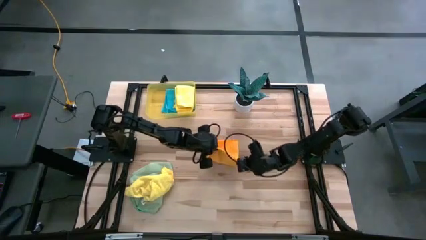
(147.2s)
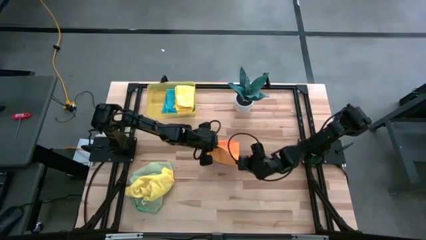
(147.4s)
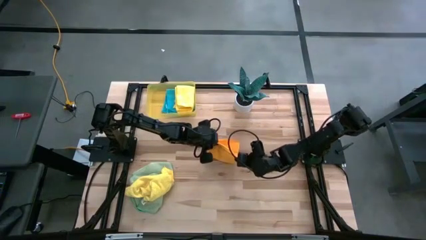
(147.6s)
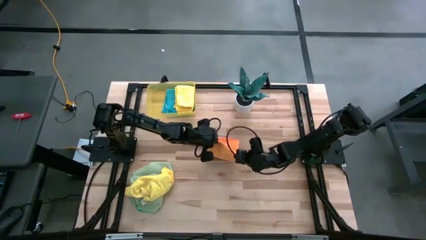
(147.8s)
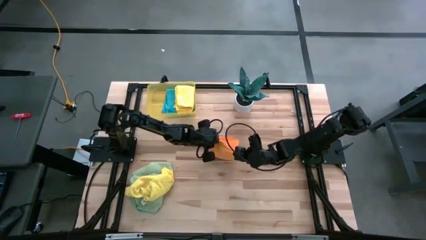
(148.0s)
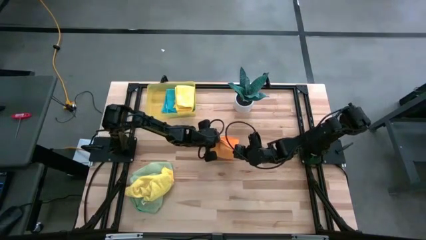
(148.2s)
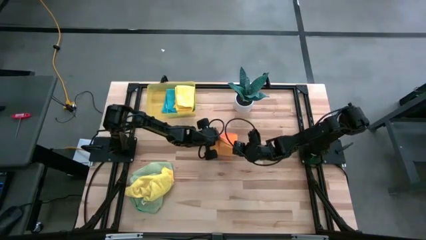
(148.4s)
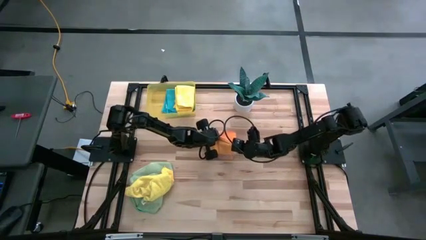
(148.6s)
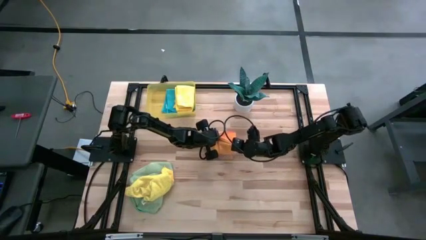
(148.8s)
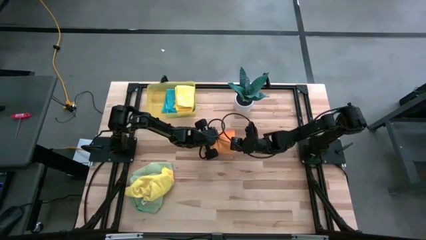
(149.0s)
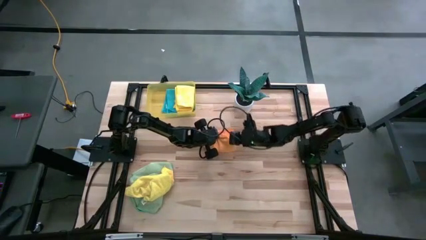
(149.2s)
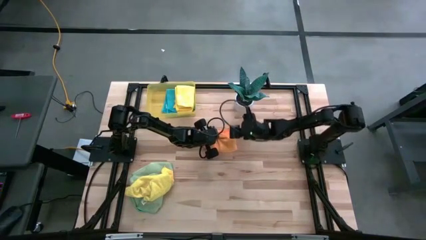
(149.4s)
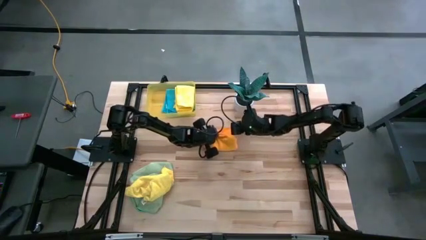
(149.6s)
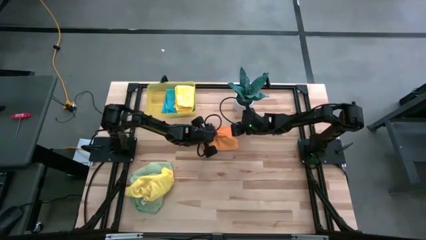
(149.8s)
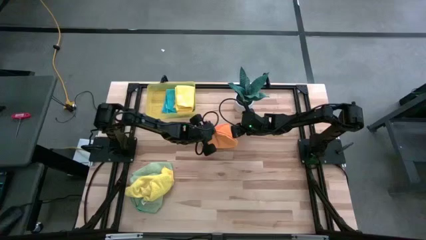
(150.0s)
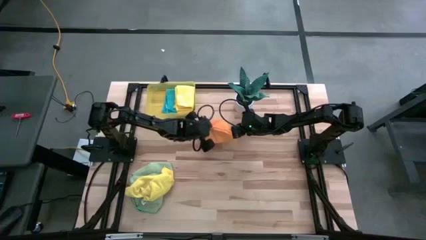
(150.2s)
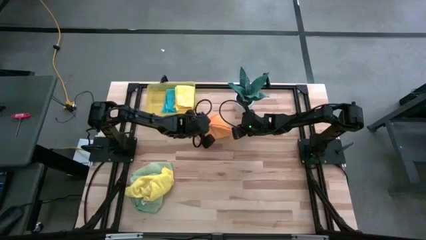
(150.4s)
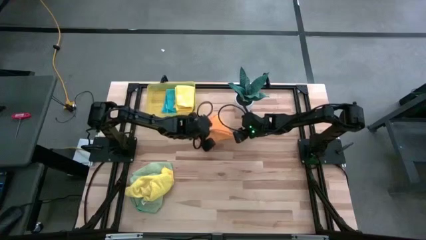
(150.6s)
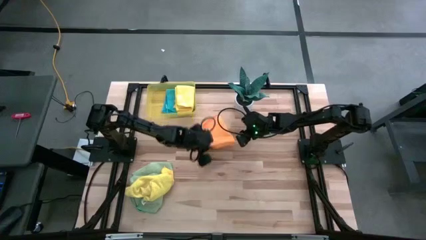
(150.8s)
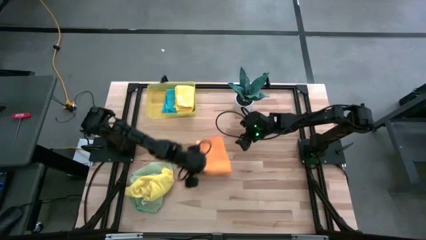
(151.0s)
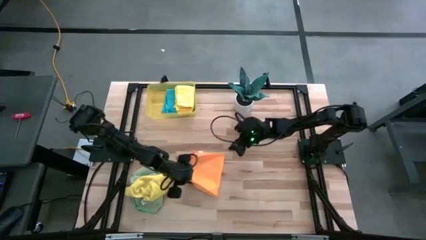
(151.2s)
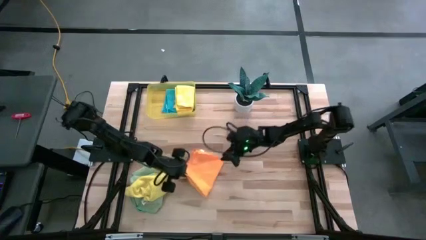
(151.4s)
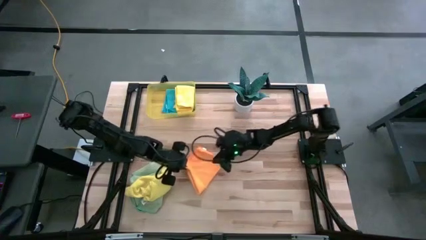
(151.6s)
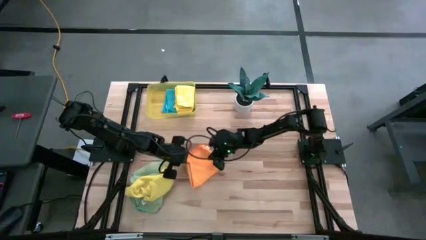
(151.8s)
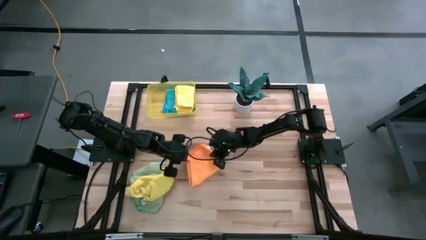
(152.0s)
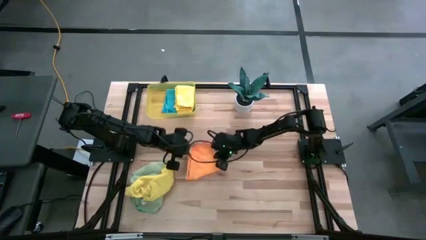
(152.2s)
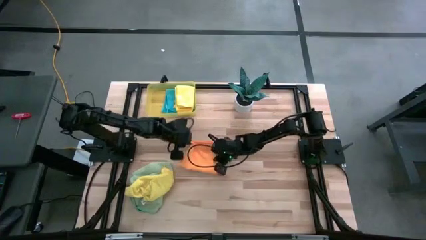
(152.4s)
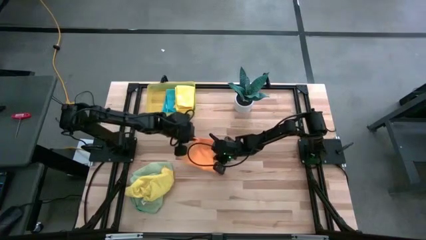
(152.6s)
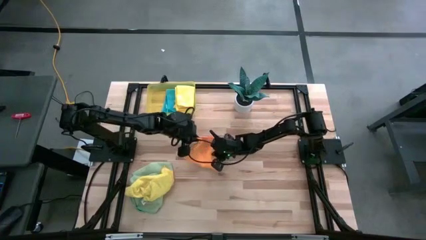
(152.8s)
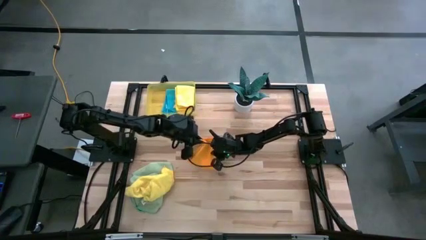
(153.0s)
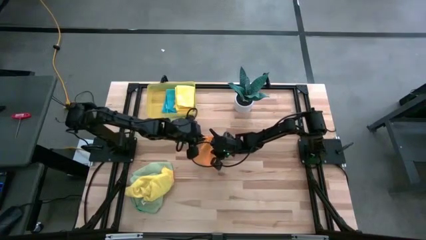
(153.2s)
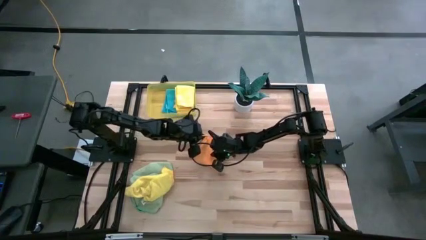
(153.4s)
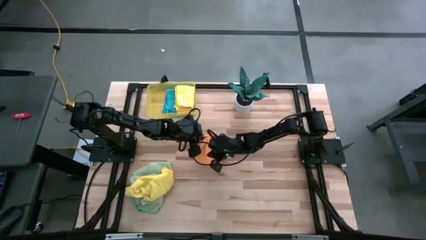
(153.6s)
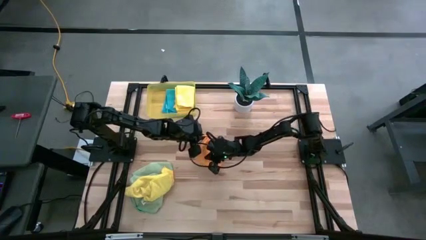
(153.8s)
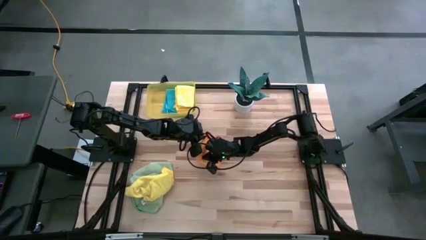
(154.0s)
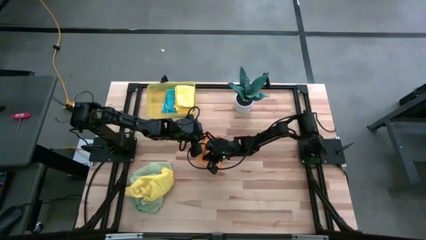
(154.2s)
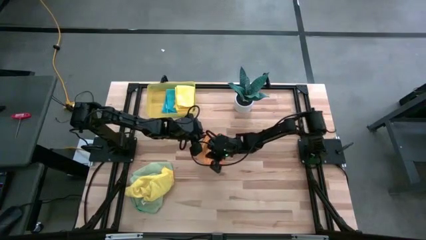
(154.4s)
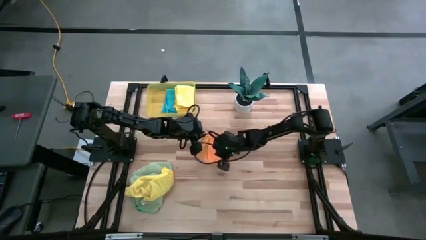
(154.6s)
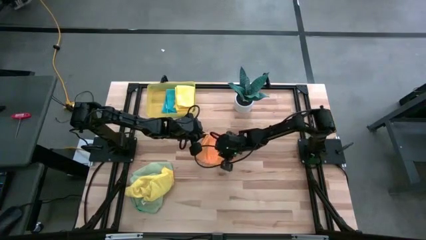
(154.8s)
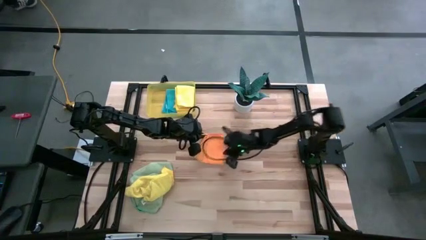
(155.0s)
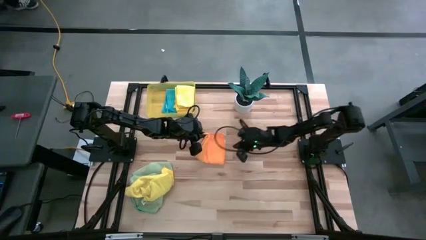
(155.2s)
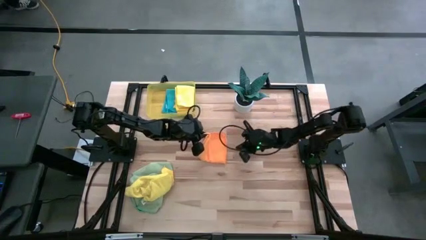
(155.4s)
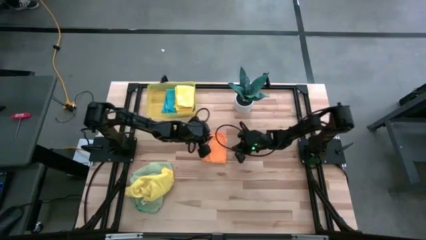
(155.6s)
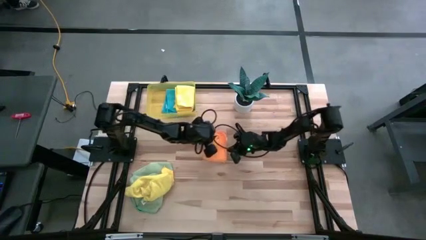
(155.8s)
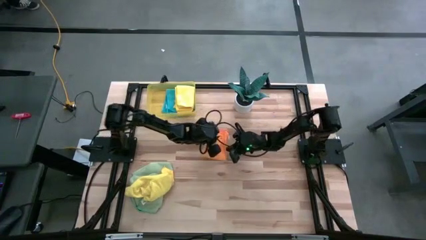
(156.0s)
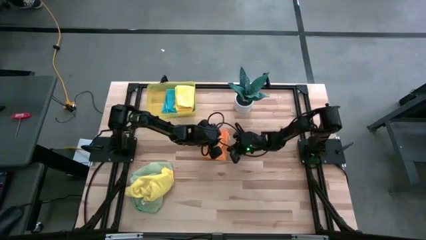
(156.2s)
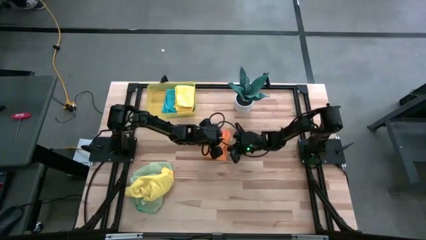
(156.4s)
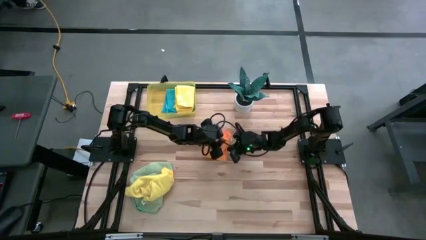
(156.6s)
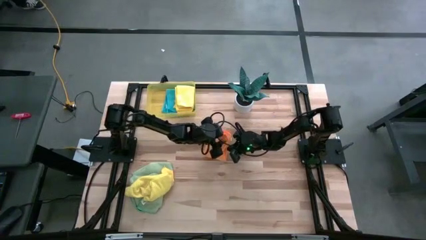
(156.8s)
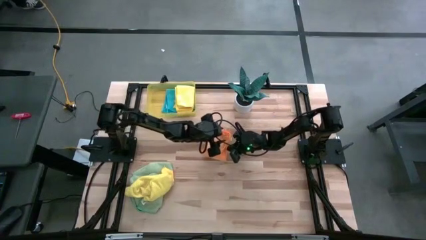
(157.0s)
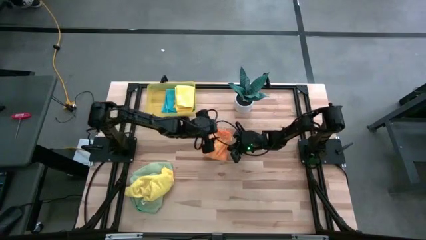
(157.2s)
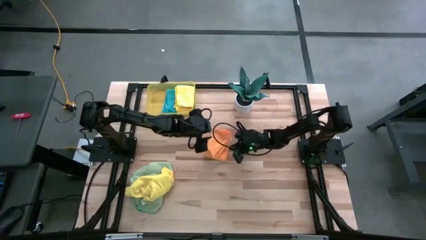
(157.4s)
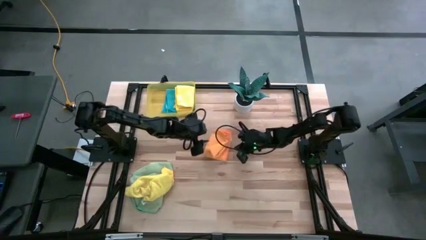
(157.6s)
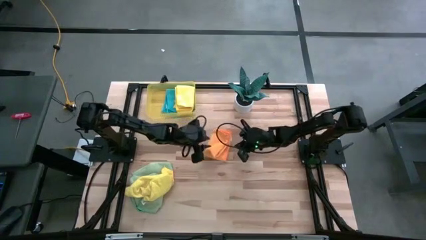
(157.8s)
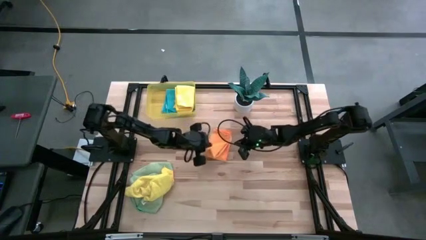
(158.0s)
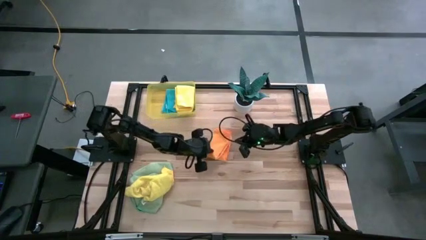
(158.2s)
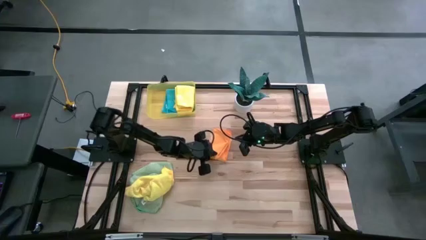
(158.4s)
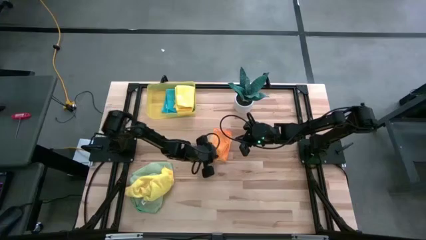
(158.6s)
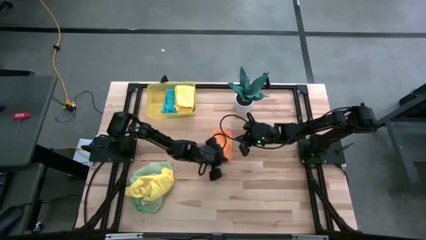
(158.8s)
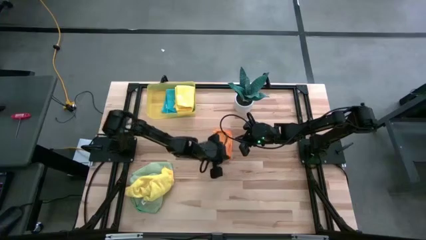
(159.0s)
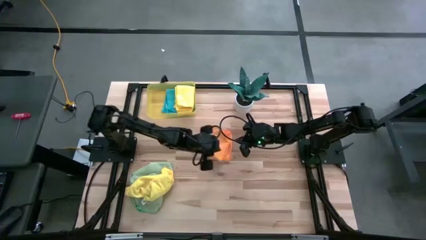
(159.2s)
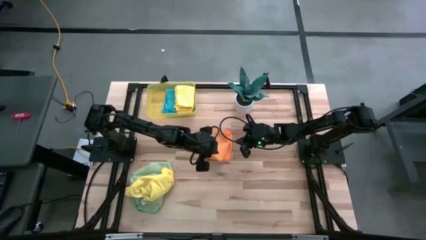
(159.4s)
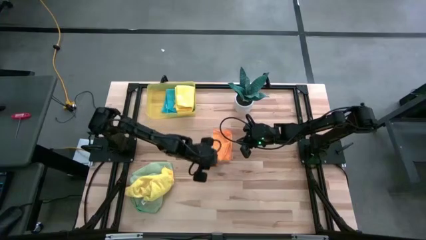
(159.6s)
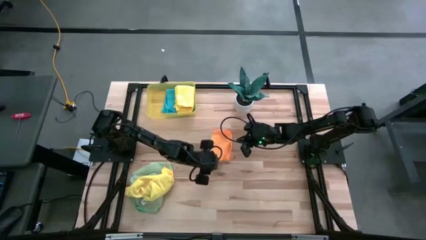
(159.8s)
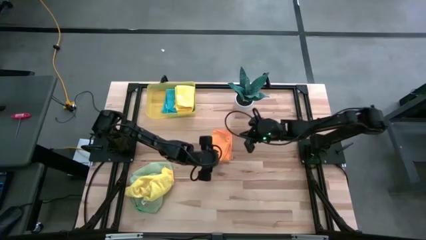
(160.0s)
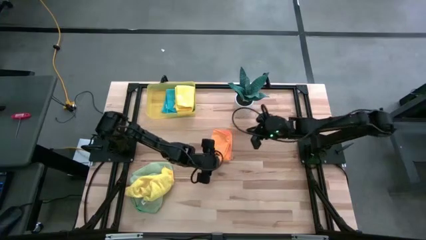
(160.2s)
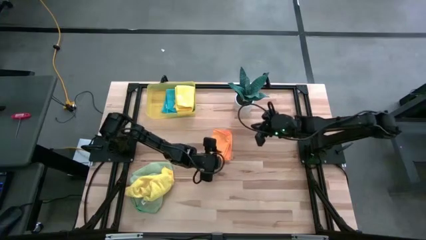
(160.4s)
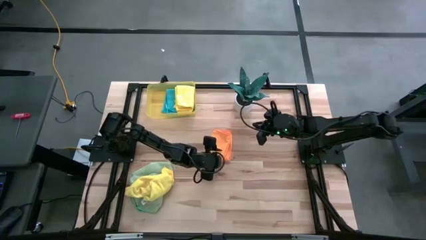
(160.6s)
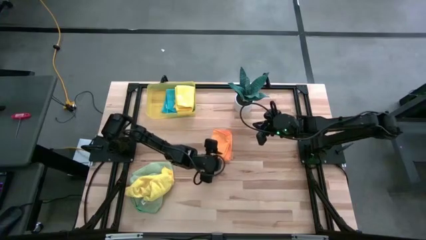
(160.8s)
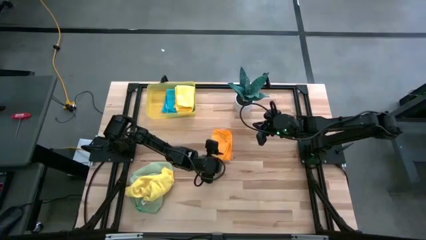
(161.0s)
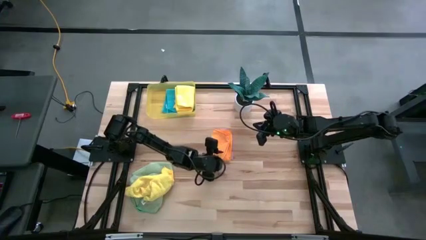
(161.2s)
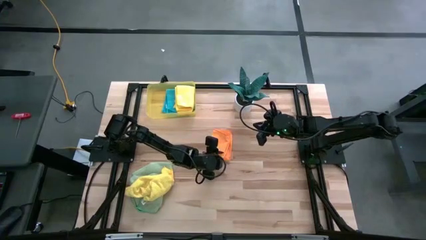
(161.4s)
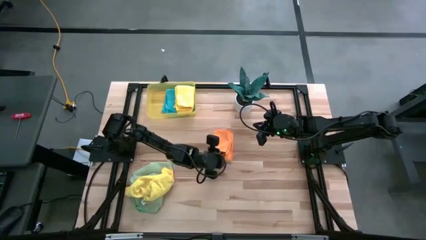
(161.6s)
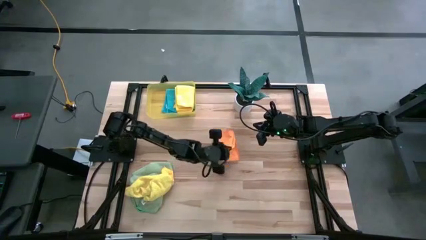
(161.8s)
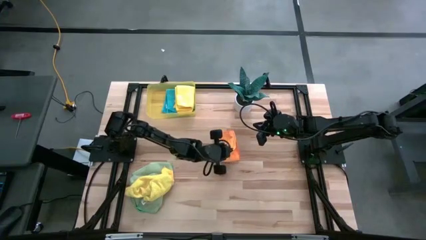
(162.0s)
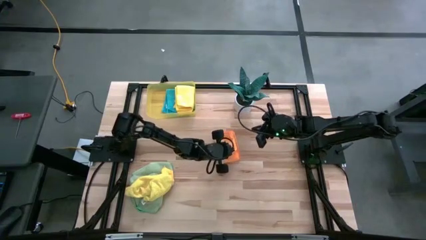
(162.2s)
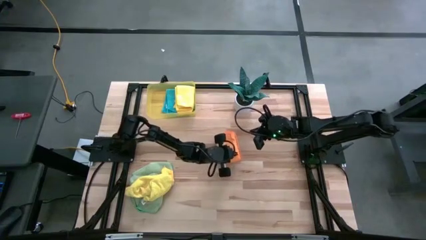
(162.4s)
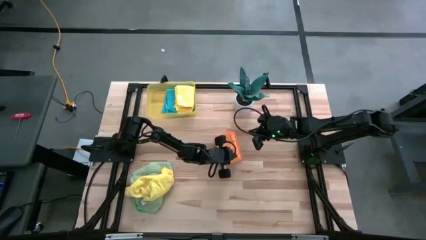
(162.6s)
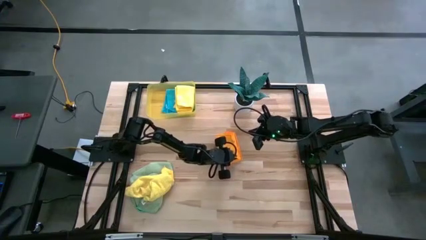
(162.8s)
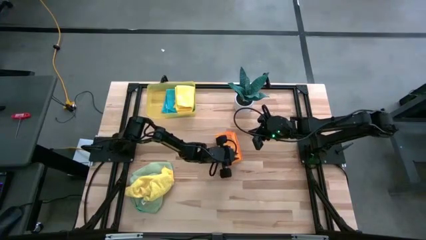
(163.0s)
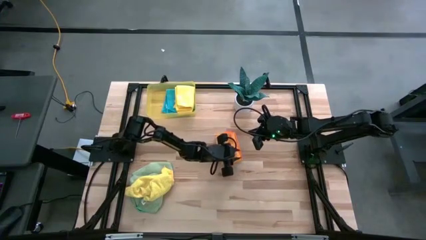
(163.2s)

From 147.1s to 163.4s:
Task: Fold microfiber towels
Fold the orange microfiber cloth
